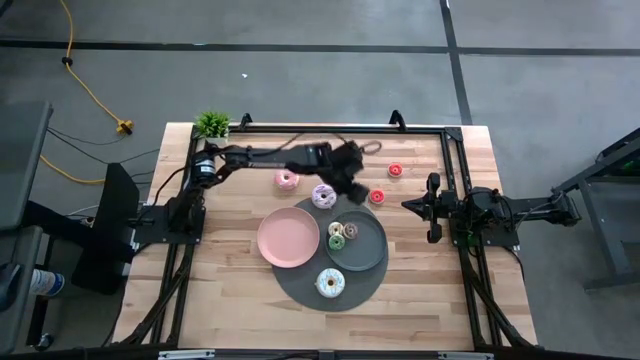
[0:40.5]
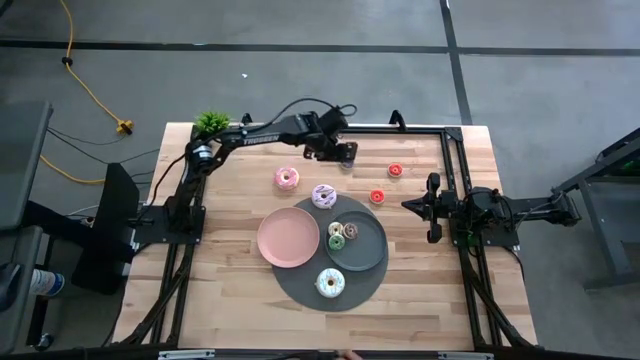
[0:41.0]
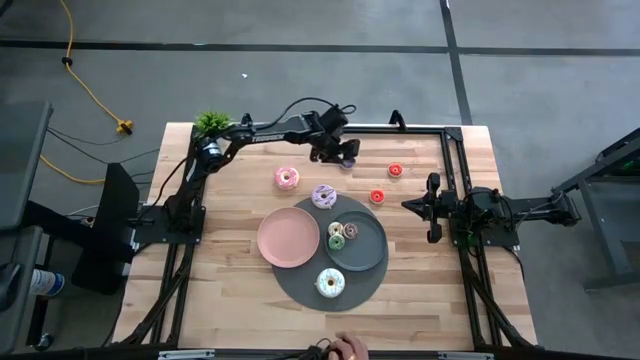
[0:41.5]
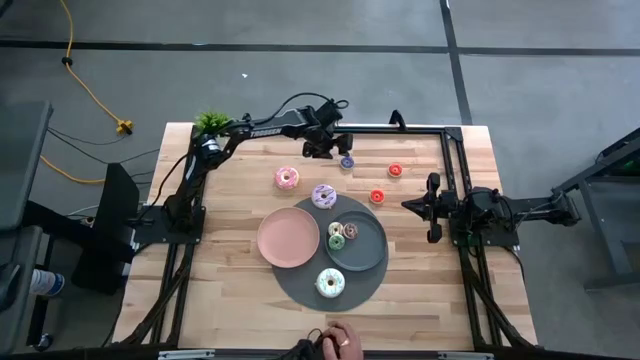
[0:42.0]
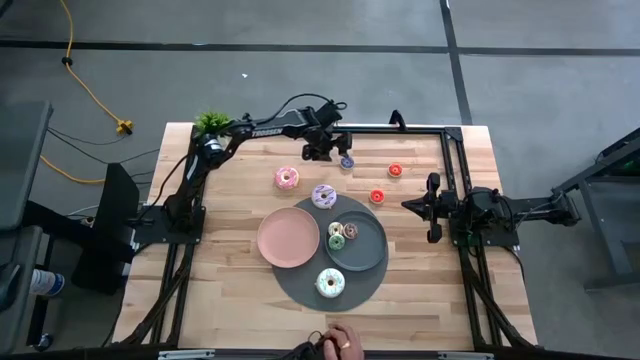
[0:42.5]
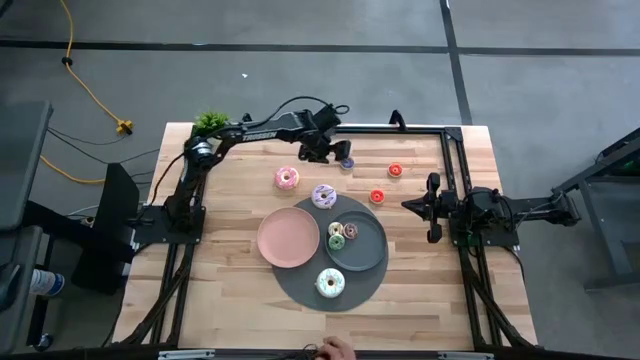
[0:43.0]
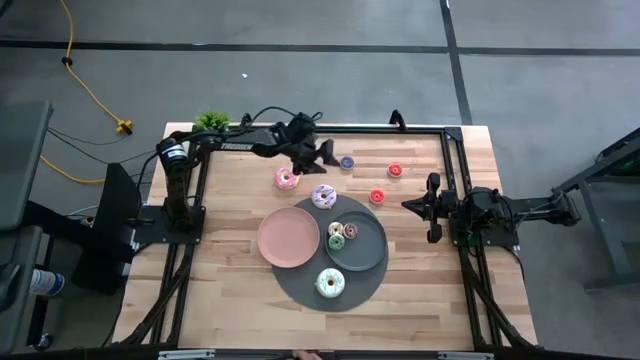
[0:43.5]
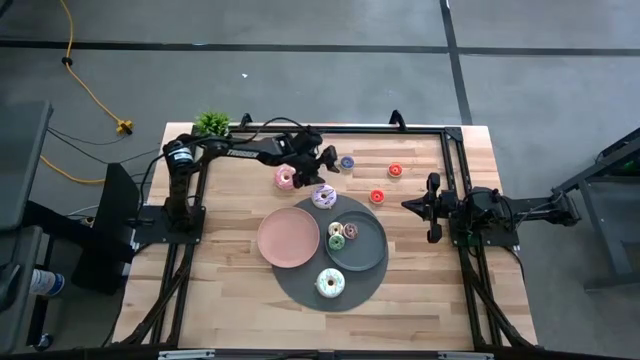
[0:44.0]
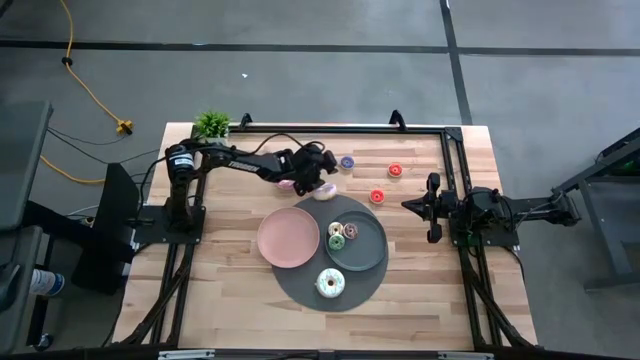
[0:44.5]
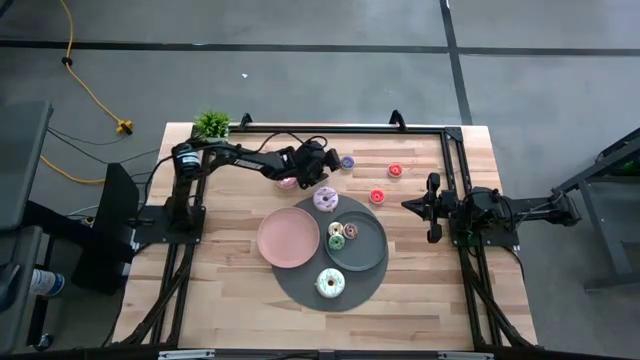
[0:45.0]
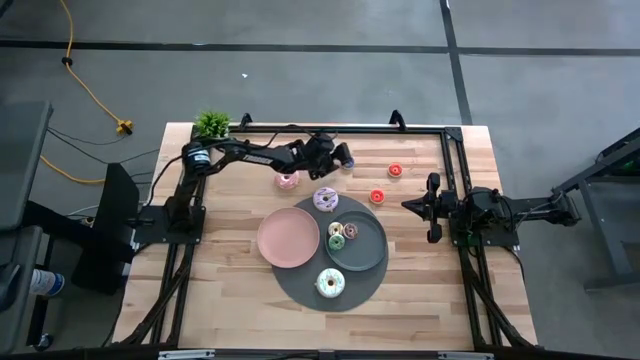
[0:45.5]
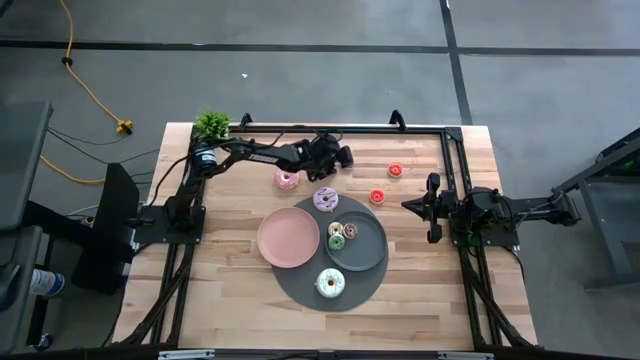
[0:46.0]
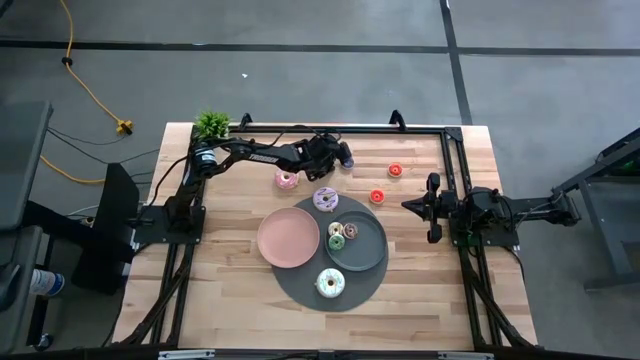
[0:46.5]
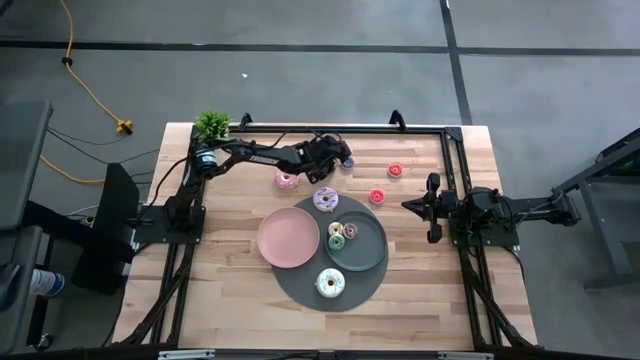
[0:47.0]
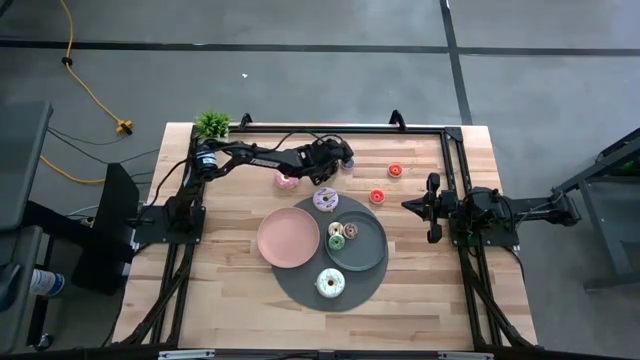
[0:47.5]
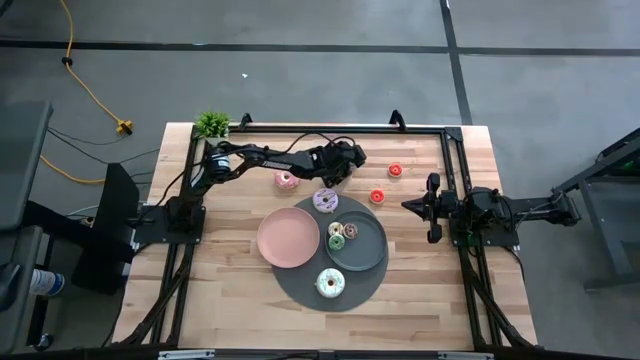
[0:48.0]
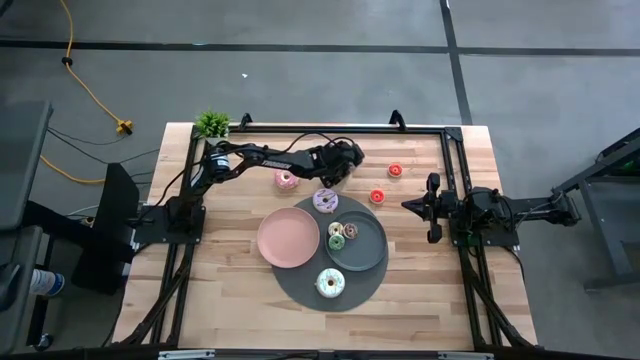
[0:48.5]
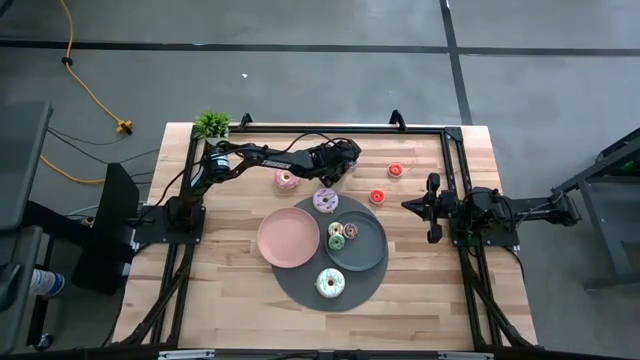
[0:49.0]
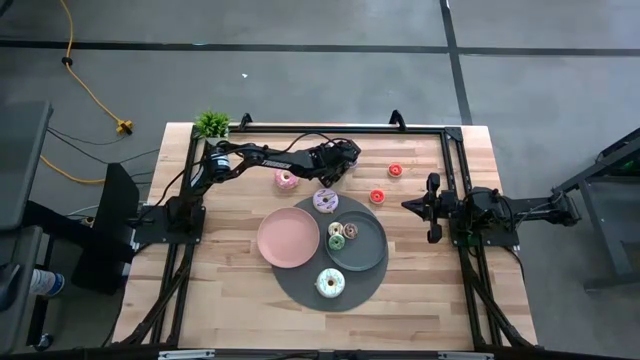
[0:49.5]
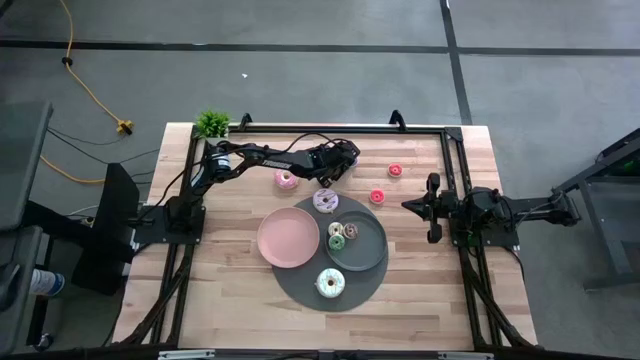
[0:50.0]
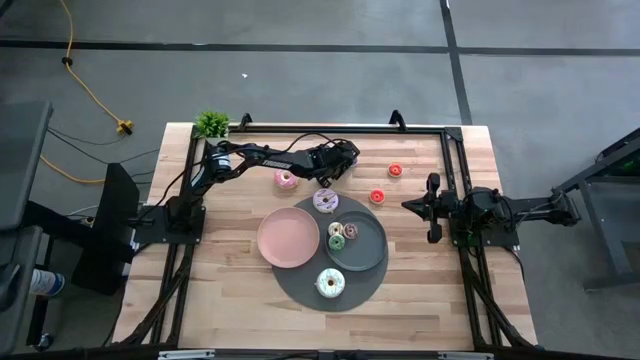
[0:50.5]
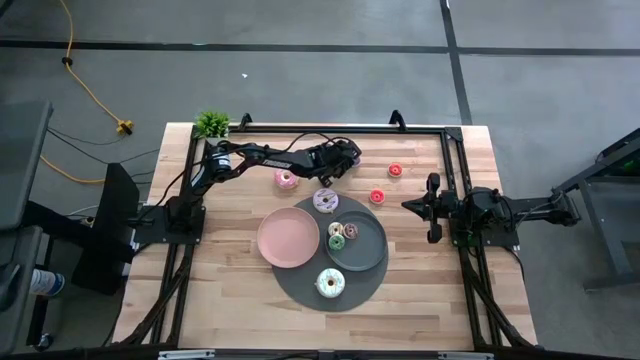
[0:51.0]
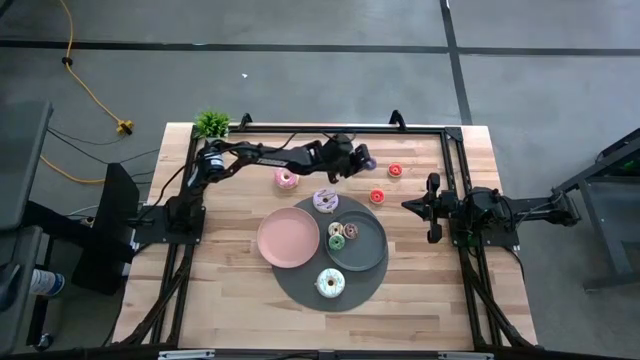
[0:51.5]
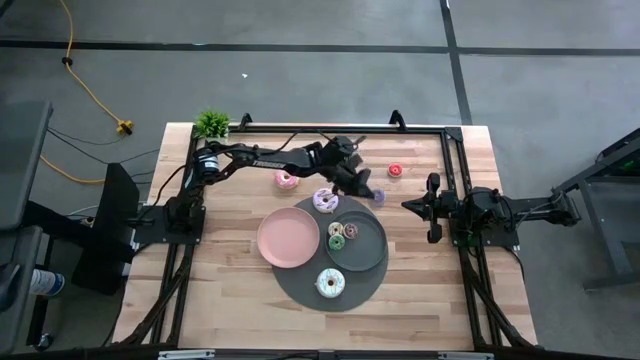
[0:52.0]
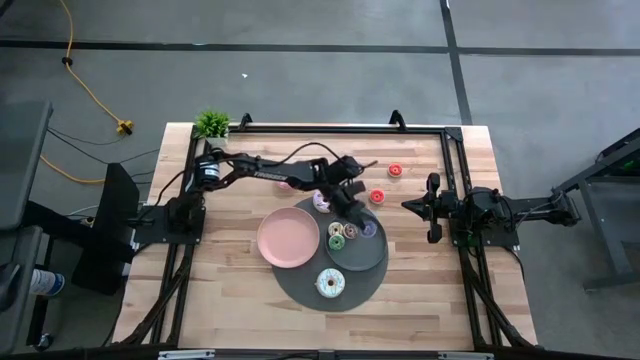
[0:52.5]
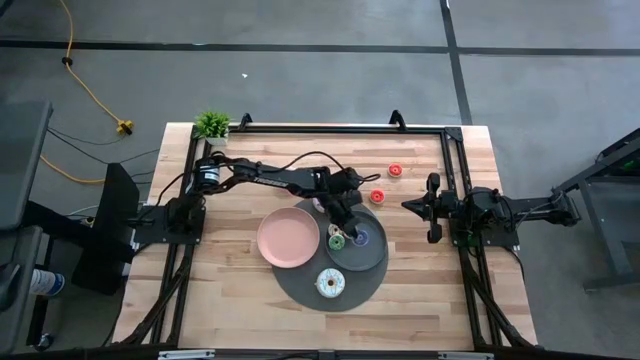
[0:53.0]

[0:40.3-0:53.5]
Task: Pick & Place donuts
Put the small violet donut on the black plate

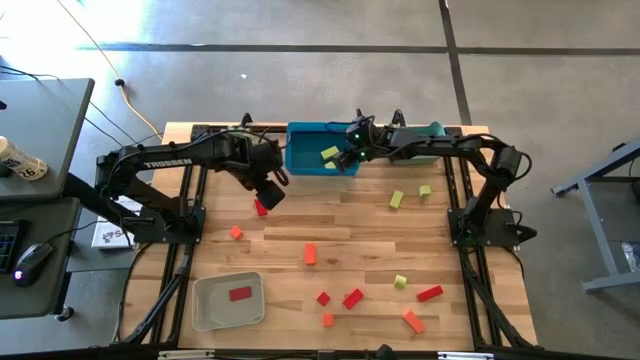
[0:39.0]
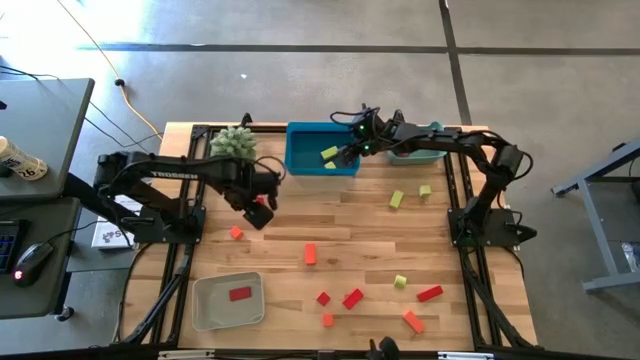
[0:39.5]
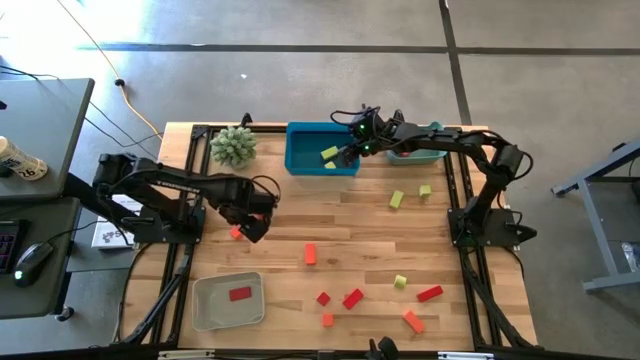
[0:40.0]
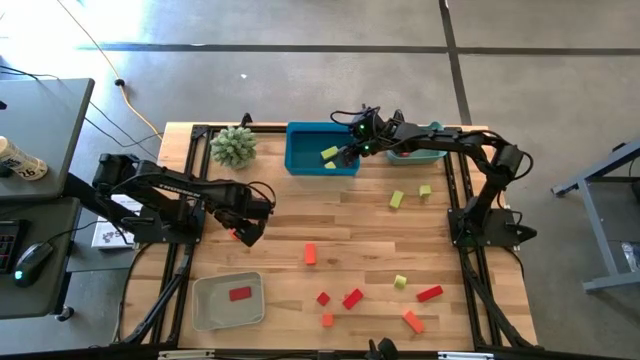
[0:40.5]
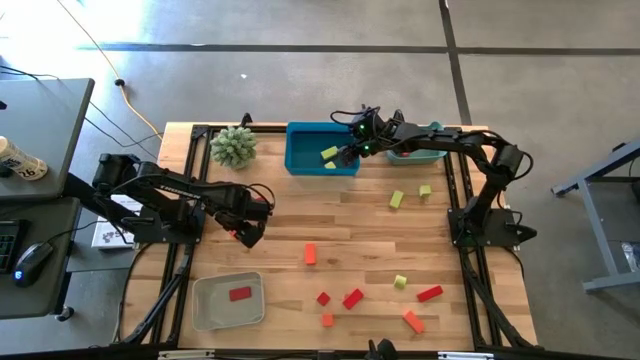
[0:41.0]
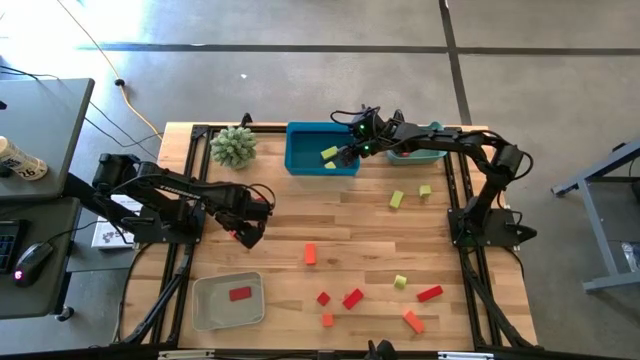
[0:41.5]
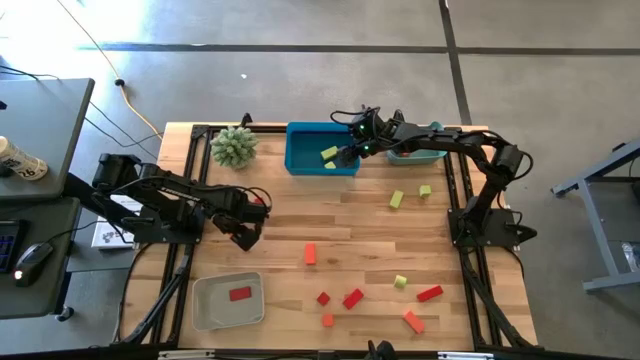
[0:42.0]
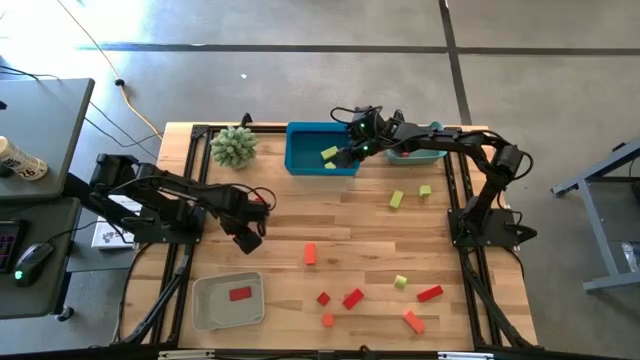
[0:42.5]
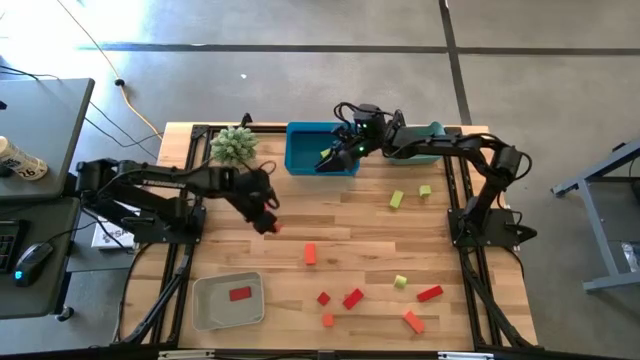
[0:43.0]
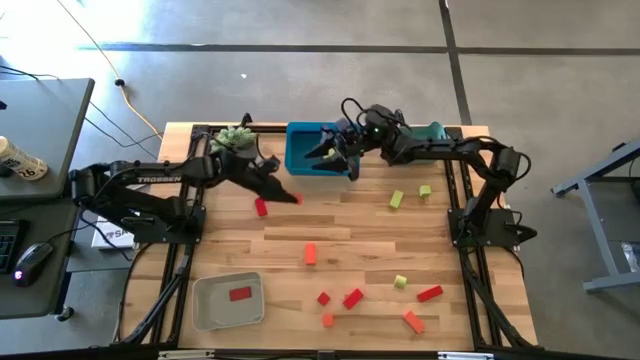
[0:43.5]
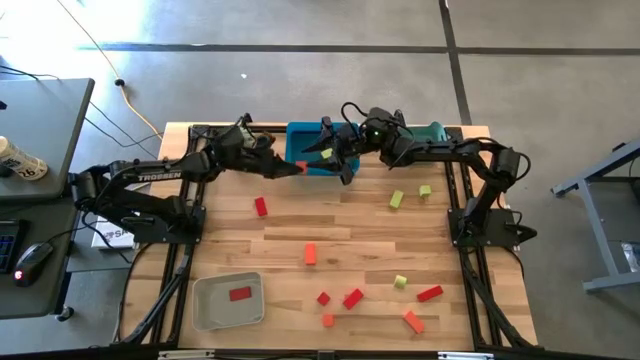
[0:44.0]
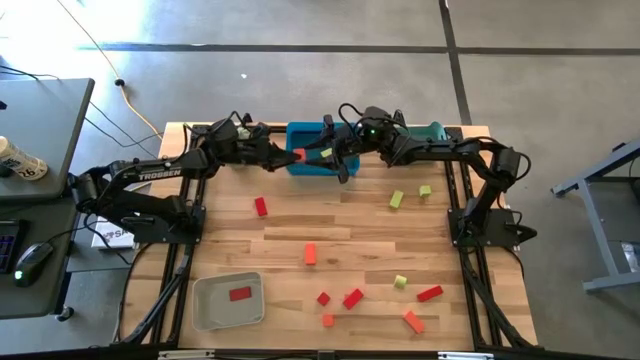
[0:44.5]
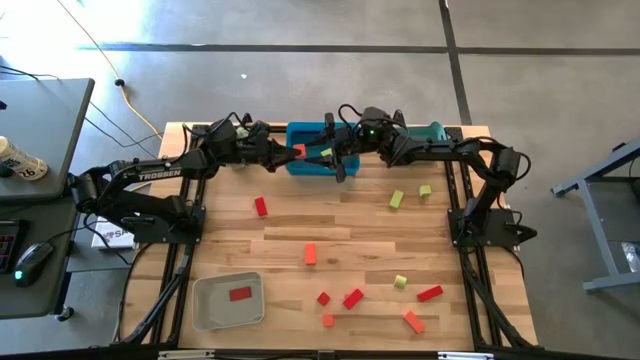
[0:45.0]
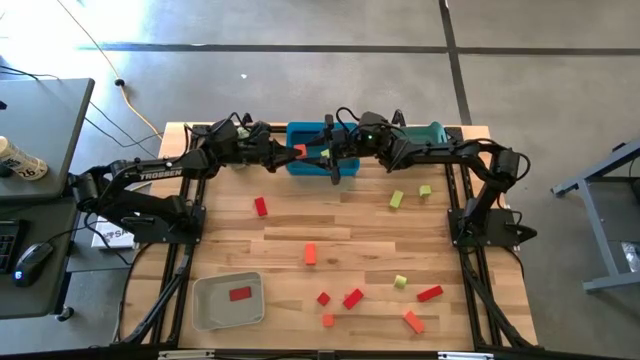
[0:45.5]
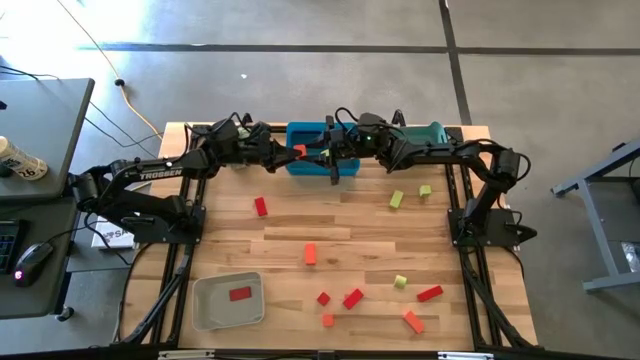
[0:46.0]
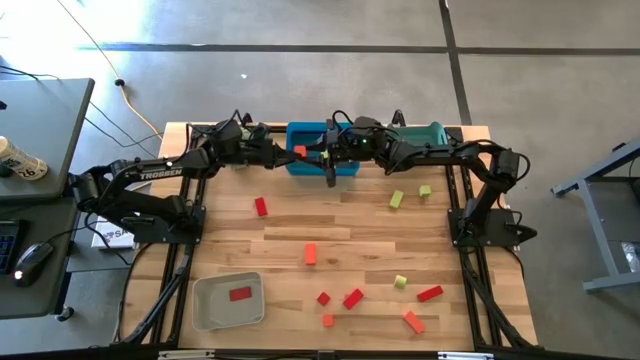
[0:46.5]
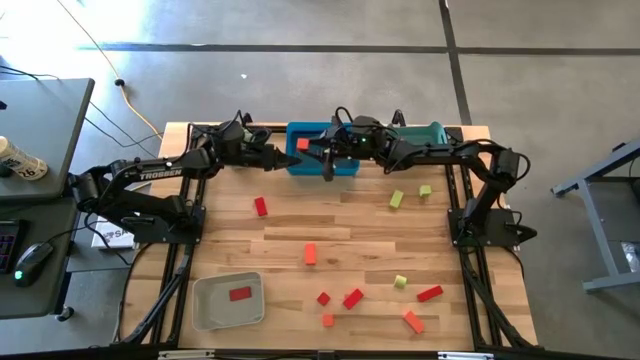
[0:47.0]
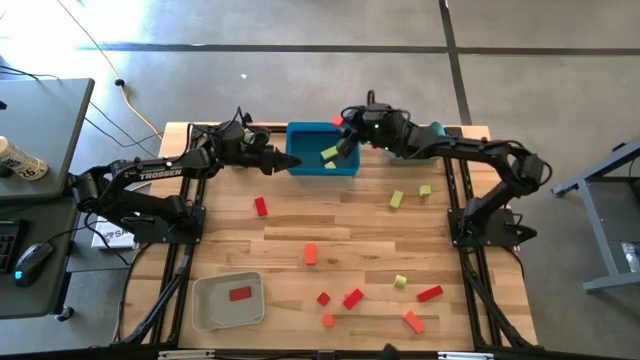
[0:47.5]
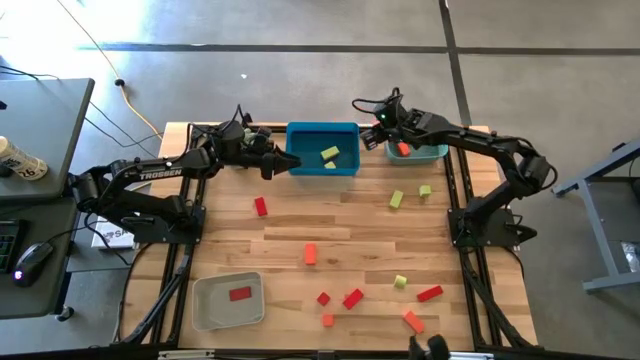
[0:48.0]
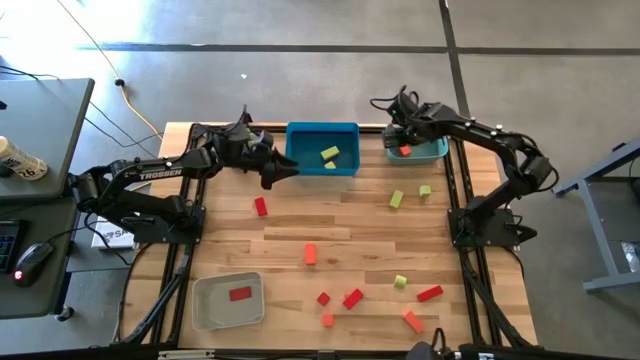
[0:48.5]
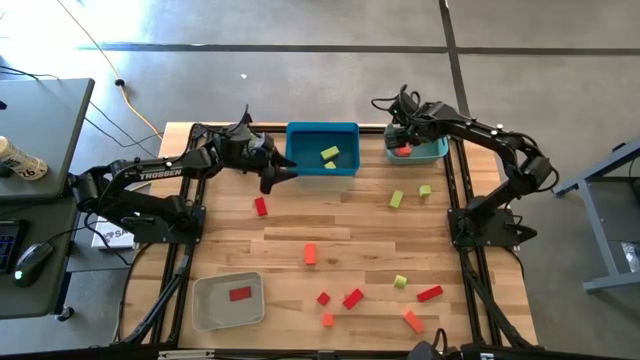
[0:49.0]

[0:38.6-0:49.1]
Task: Sort & place blocks by color
Put the orange block into the green bin
